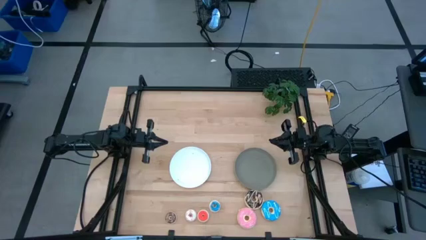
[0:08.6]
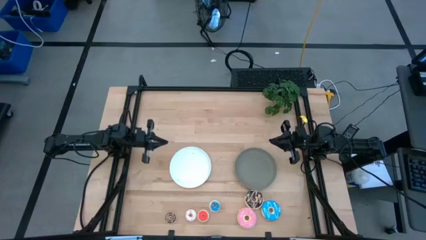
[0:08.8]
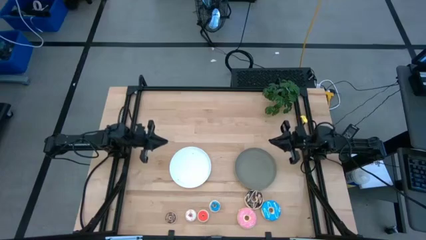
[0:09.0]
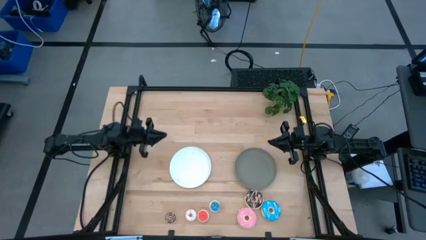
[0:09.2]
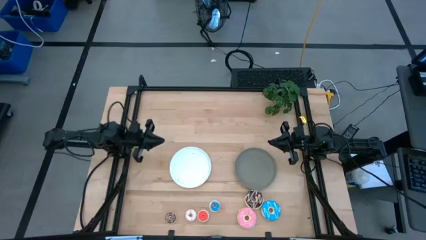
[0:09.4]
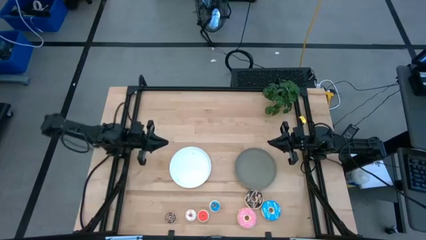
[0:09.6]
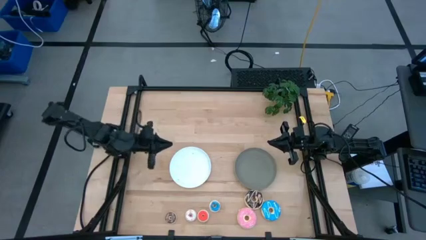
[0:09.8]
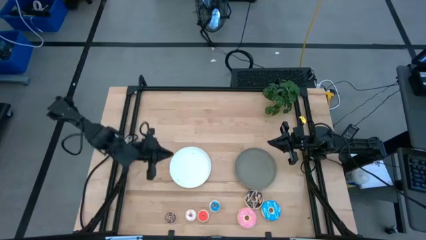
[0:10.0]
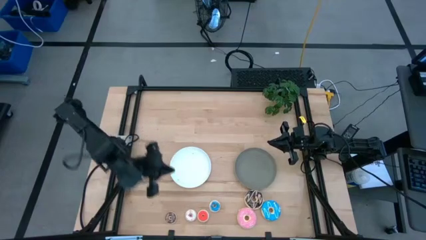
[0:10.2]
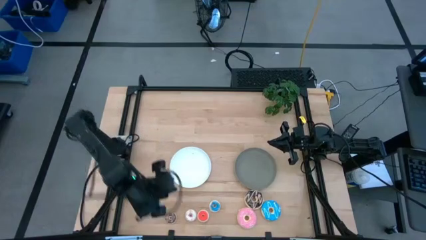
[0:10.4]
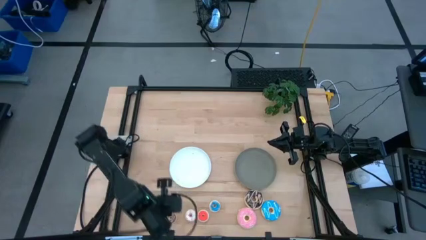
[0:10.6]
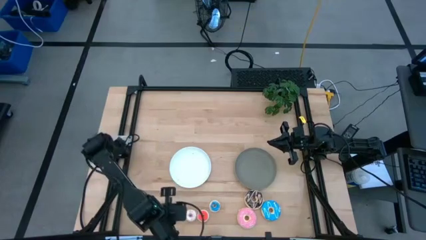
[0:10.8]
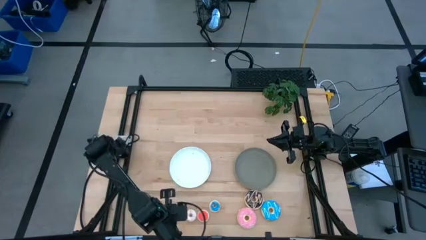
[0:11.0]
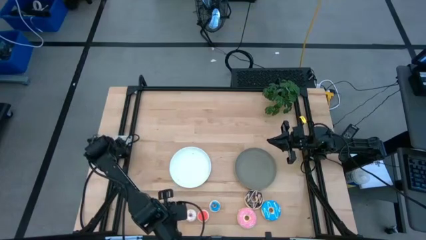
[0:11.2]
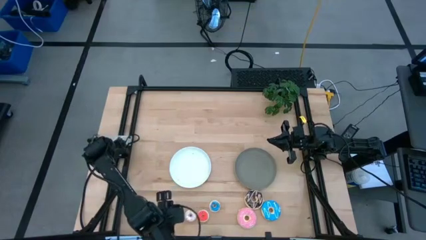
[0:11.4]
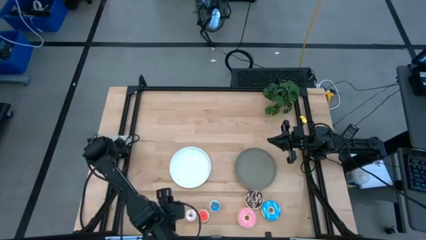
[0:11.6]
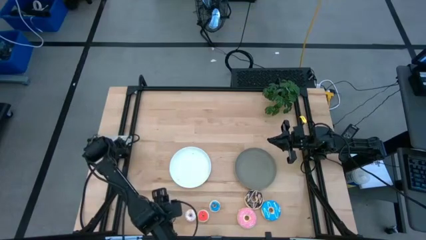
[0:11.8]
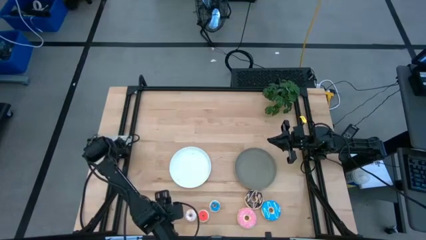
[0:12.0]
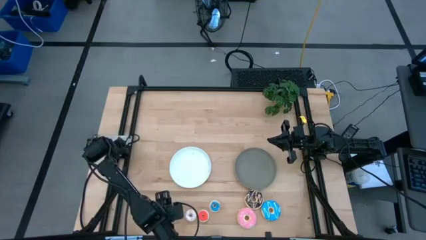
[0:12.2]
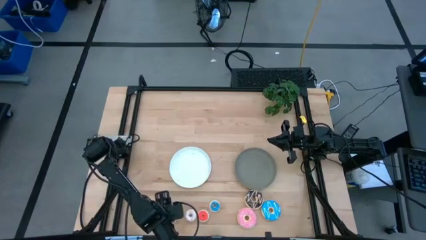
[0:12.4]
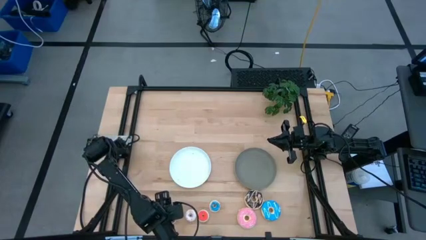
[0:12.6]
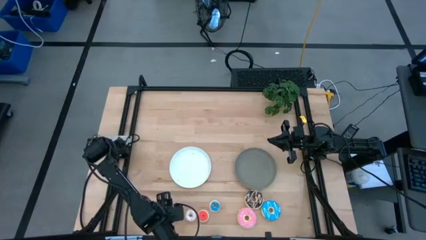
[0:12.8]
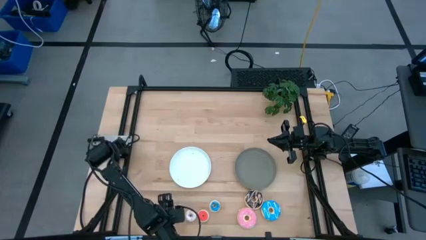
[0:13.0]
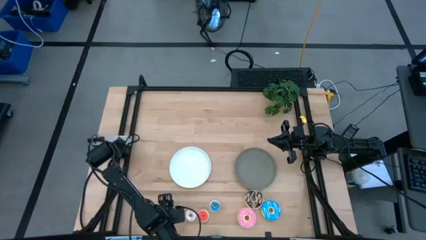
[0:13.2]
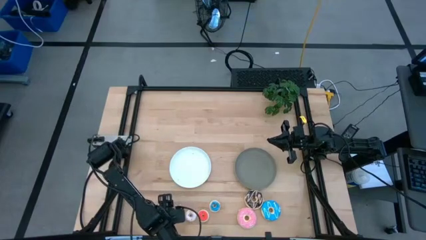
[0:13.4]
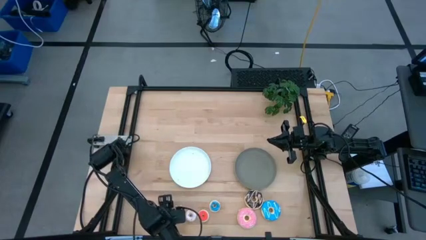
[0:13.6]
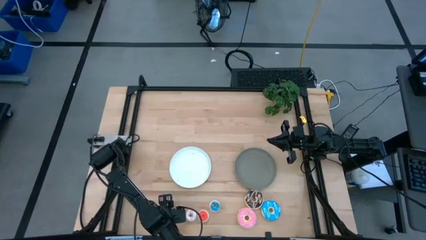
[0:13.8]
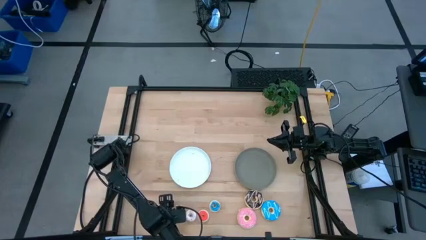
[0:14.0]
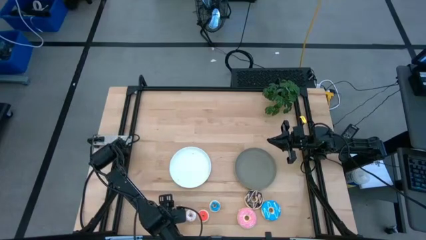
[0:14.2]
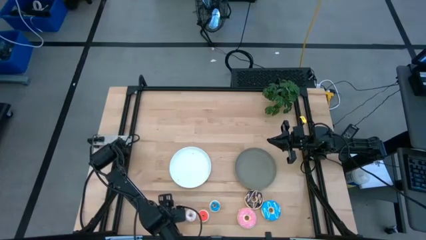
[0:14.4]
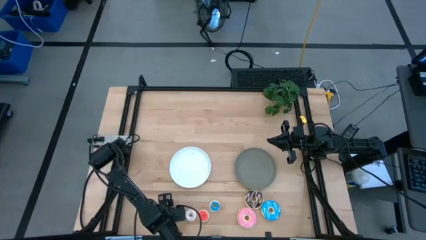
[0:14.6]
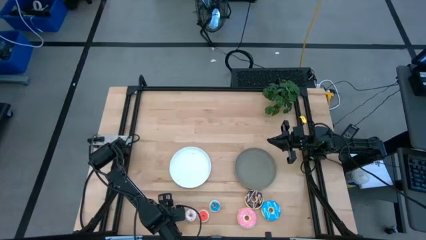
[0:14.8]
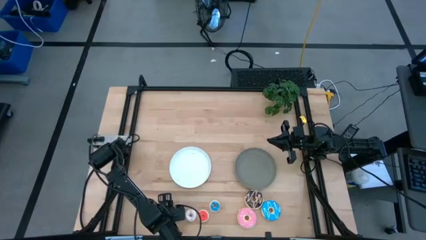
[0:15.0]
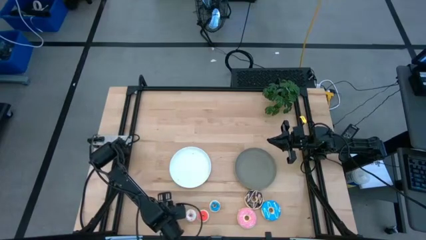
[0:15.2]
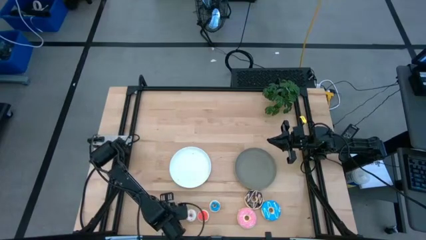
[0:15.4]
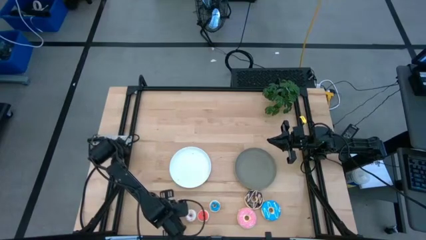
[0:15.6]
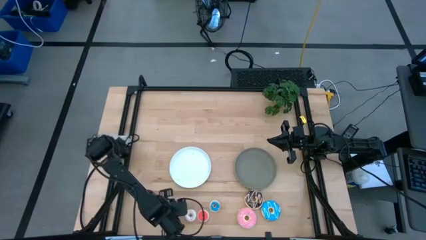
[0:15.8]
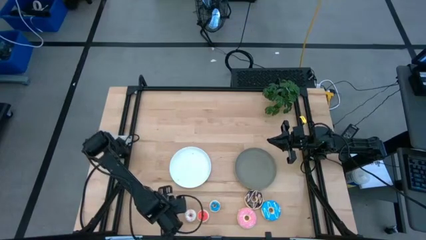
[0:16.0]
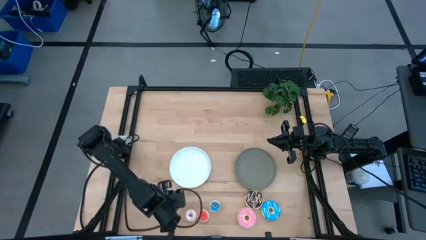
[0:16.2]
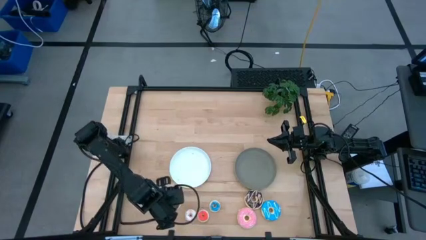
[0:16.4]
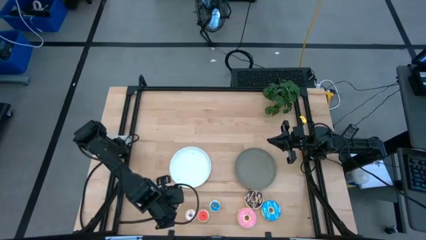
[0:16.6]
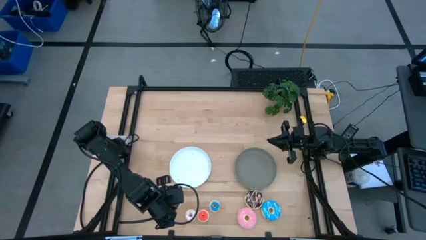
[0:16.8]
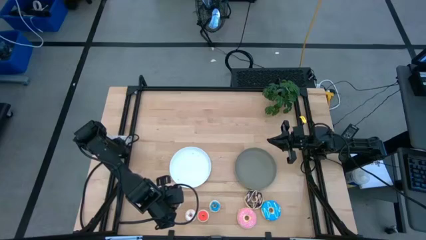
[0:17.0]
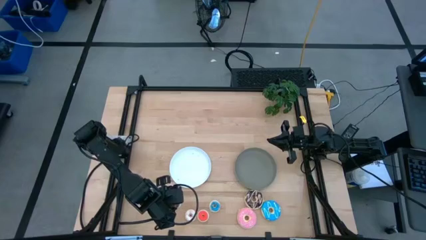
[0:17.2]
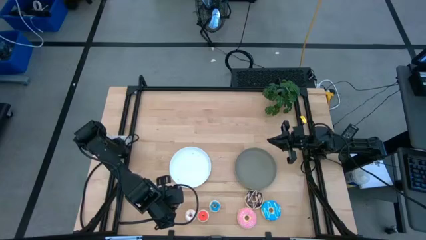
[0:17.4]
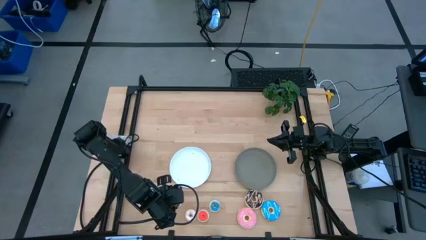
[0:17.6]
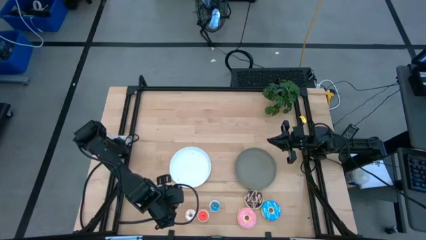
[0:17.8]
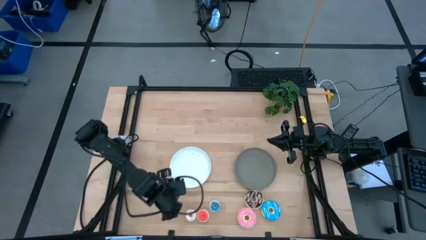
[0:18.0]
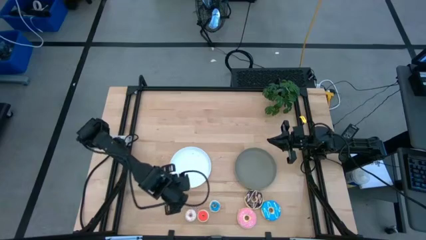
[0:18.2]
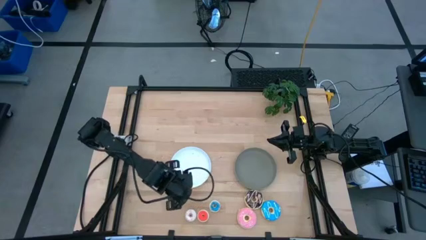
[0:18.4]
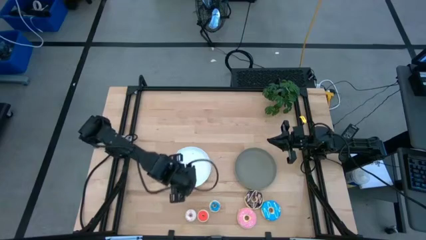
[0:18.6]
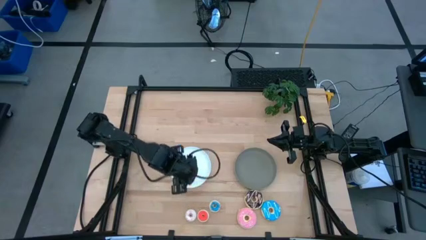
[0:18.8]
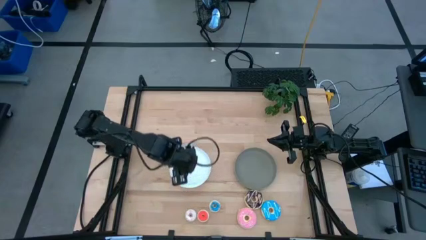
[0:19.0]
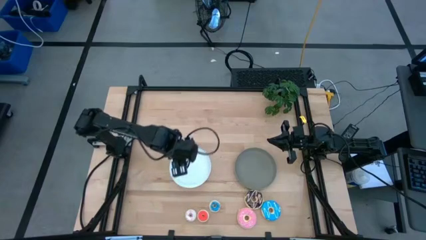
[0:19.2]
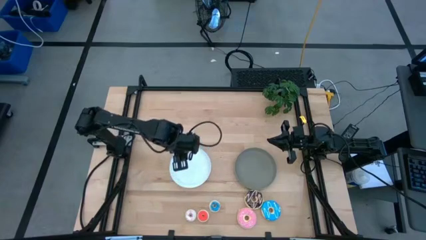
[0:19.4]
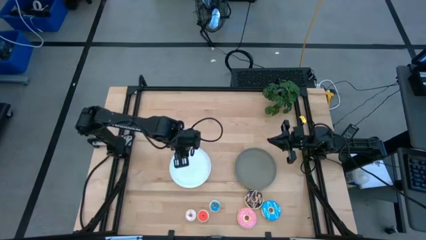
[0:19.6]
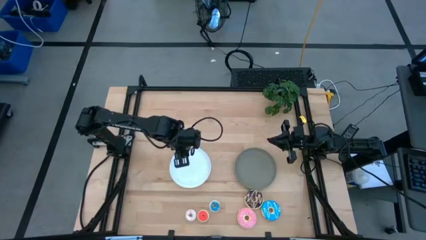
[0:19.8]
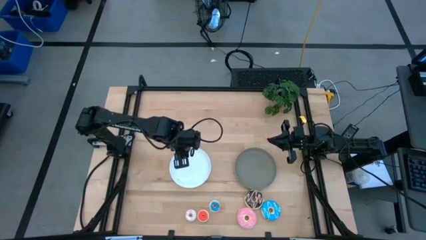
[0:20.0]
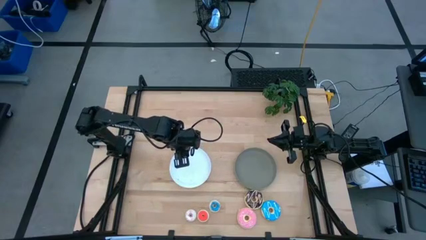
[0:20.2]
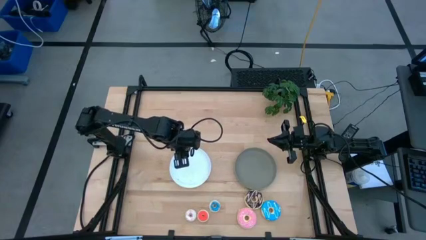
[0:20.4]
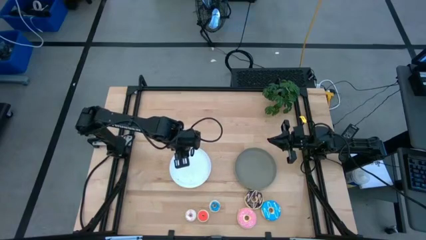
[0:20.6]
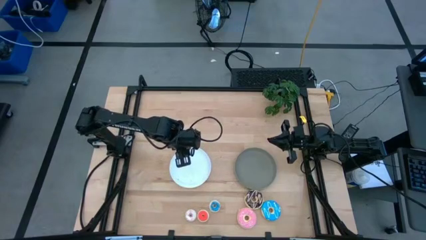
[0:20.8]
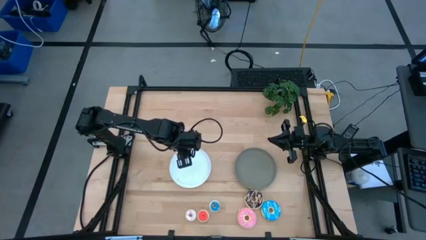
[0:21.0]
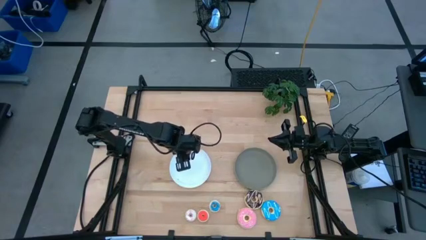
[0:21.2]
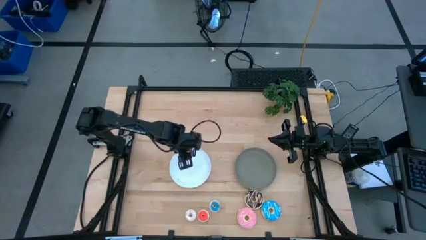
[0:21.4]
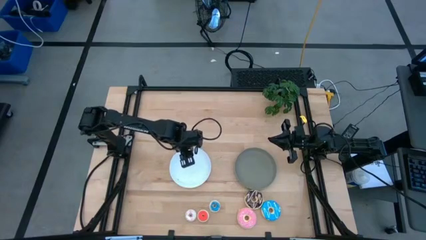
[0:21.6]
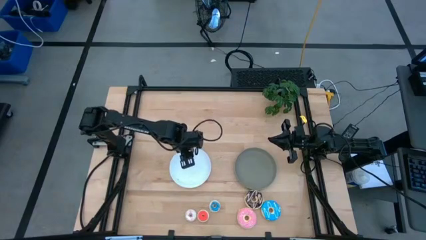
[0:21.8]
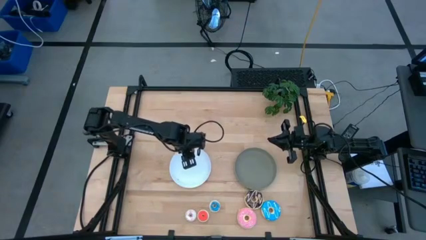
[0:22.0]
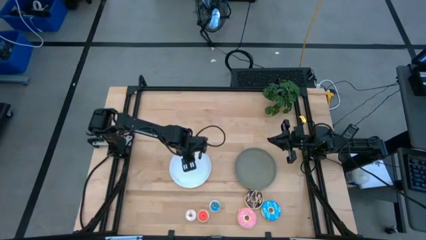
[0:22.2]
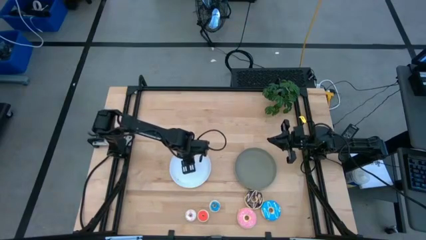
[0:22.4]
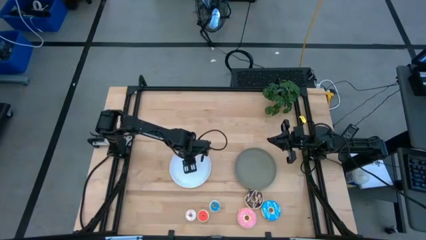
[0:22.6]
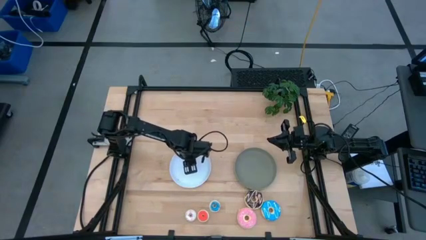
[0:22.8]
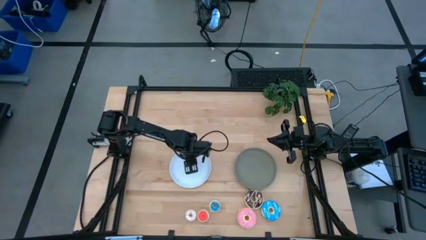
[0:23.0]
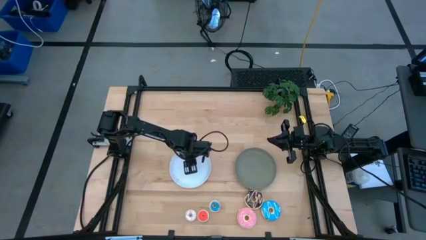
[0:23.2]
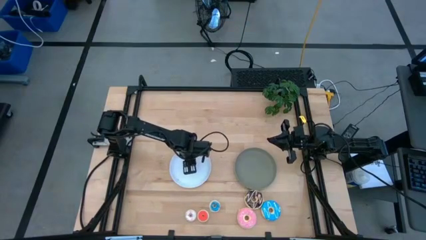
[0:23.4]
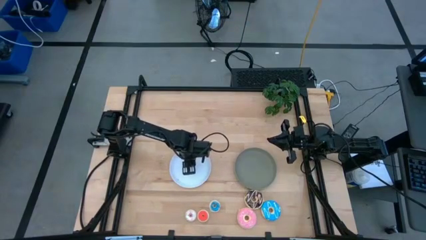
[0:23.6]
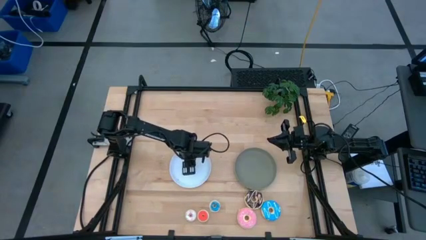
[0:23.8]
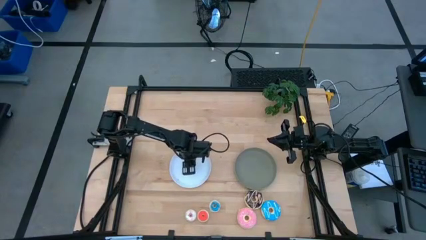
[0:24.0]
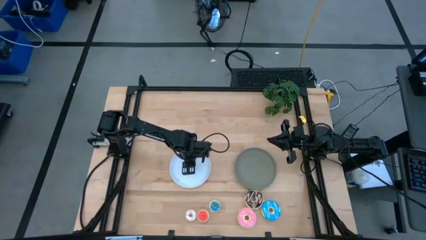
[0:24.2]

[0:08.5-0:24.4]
Task: Pick & Place donuts
Put the small brown donut on the white plate
